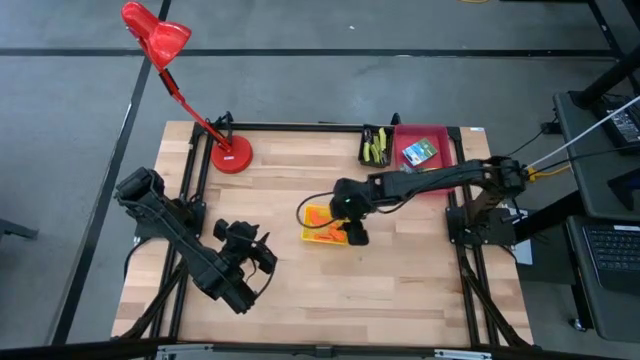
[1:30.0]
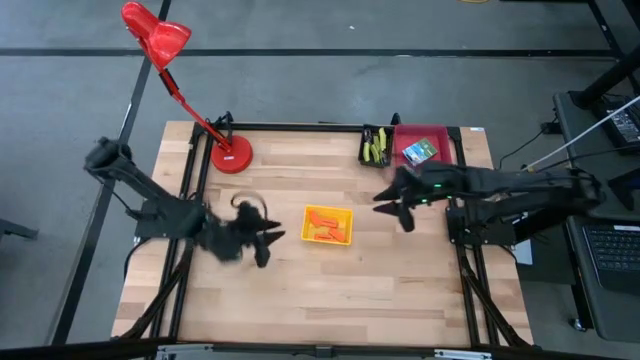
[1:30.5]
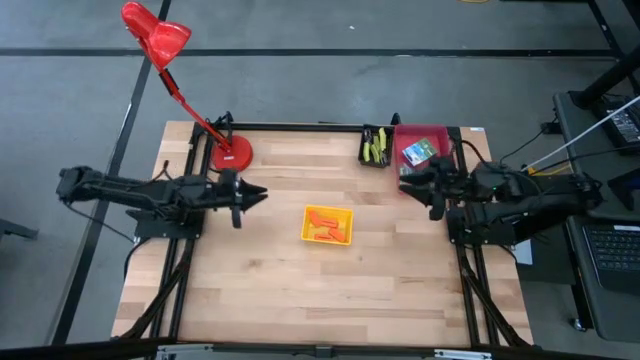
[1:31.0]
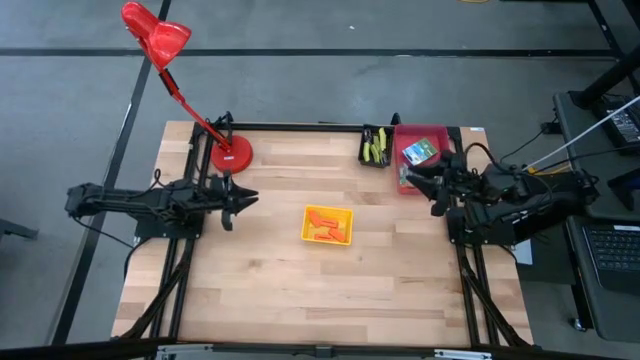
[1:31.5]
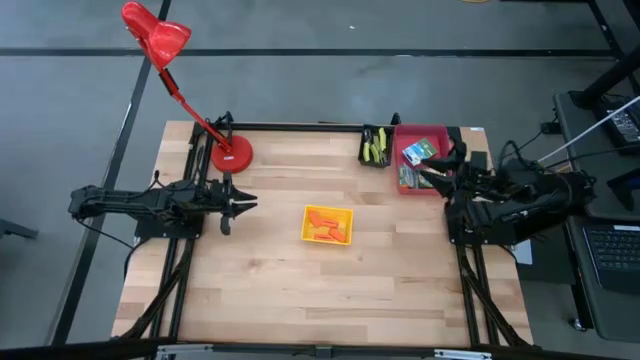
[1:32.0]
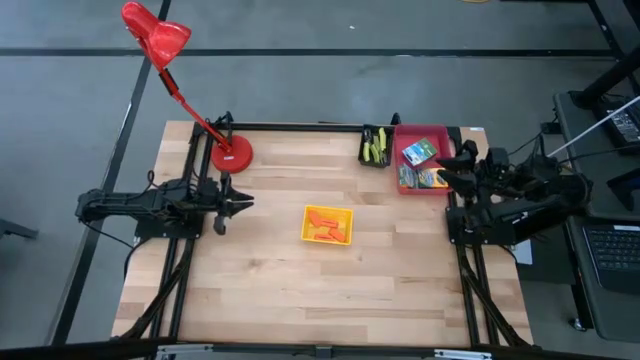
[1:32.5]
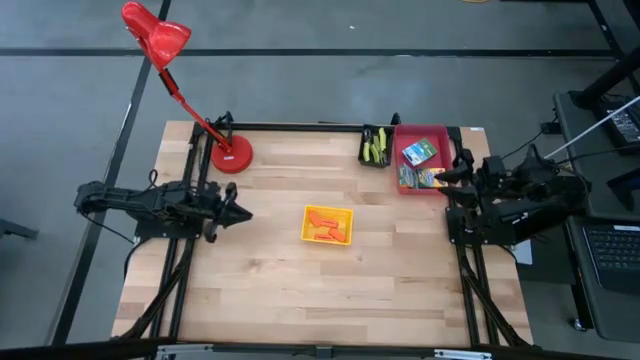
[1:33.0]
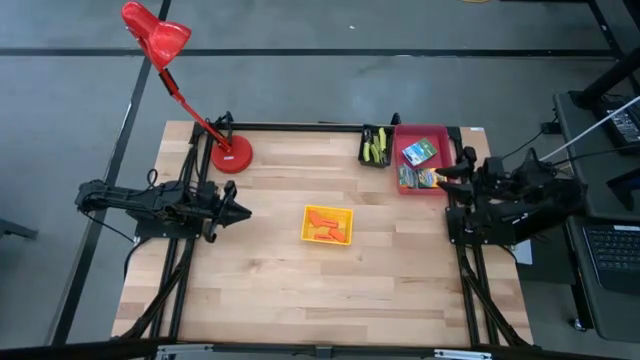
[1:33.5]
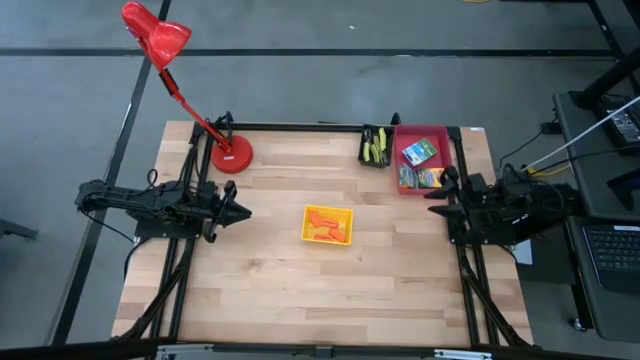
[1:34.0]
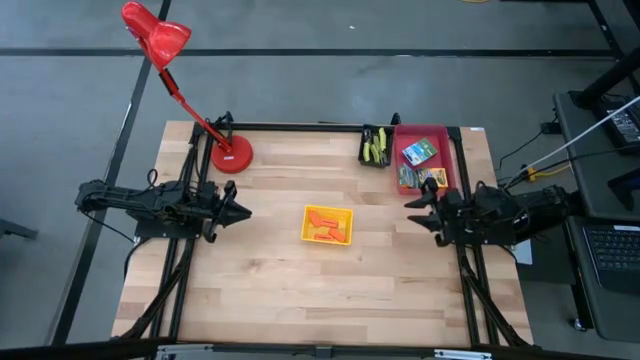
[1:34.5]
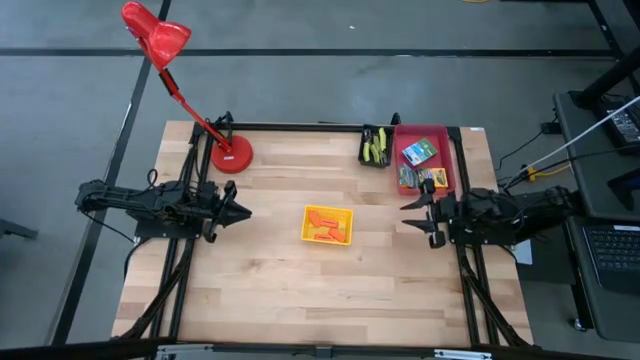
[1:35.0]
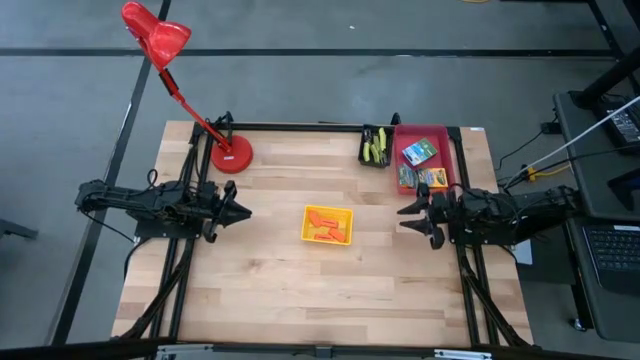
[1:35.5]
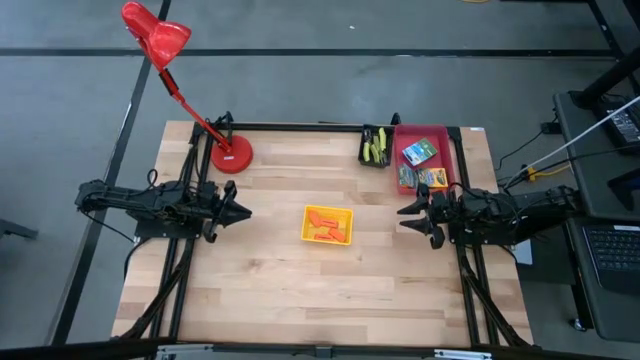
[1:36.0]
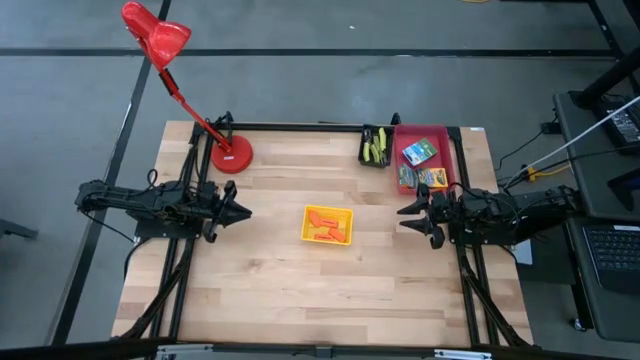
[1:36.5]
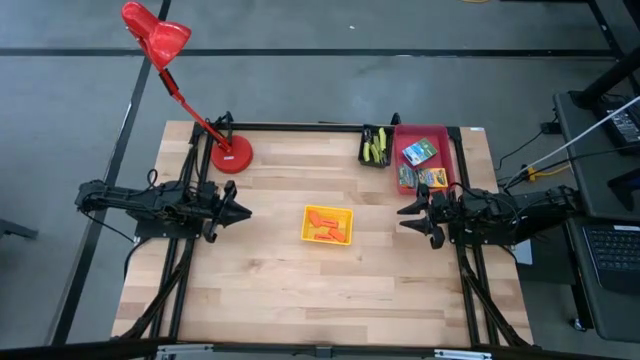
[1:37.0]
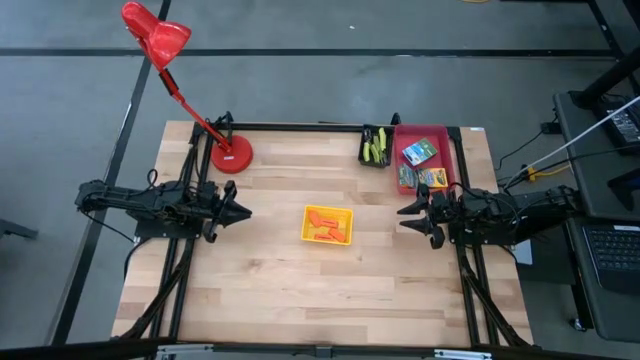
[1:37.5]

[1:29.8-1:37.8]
Task: Pick & Place School Supplies
Return to Home Position

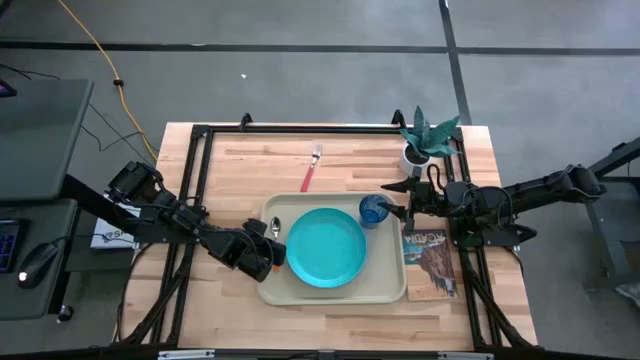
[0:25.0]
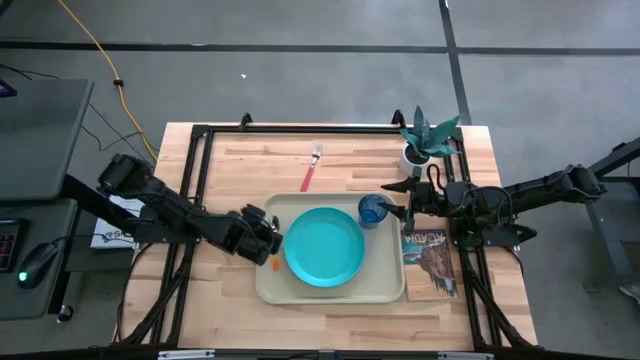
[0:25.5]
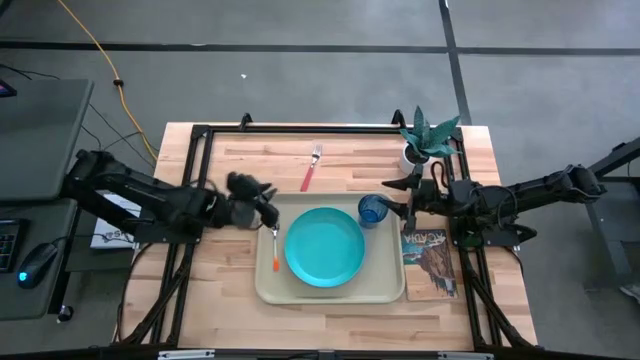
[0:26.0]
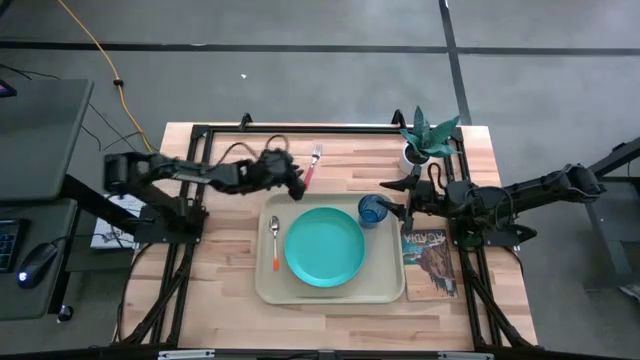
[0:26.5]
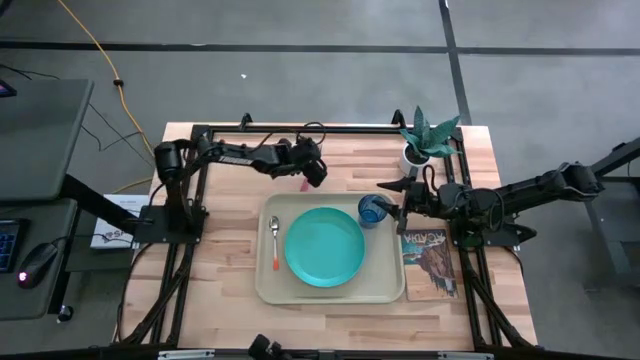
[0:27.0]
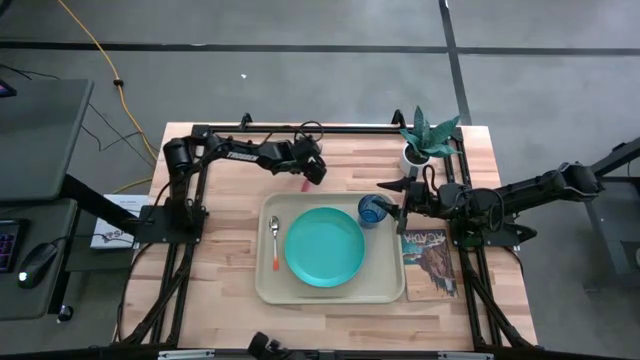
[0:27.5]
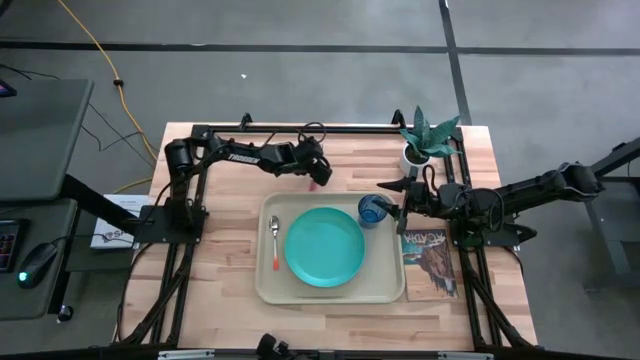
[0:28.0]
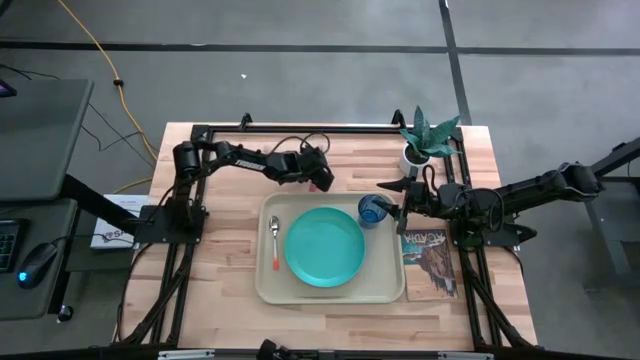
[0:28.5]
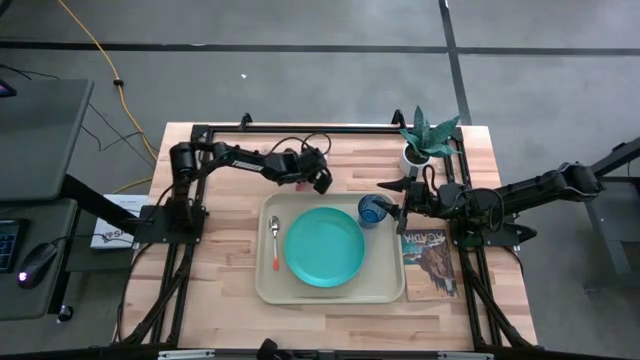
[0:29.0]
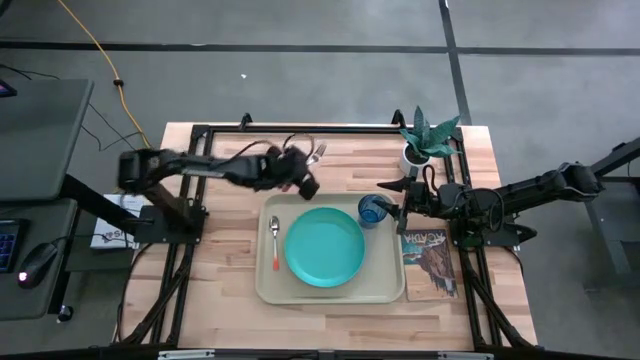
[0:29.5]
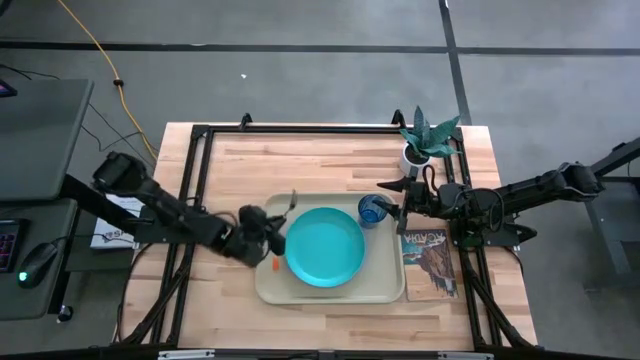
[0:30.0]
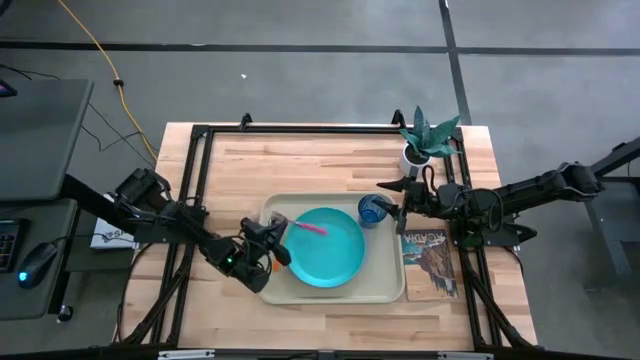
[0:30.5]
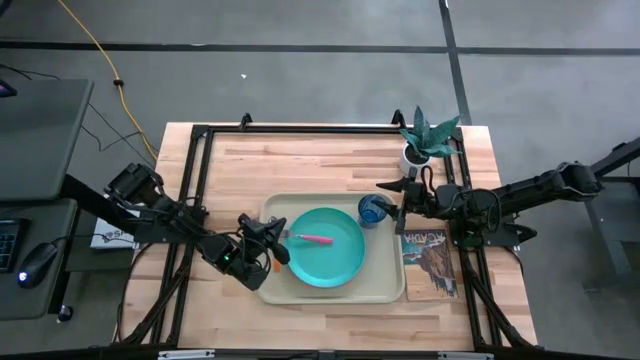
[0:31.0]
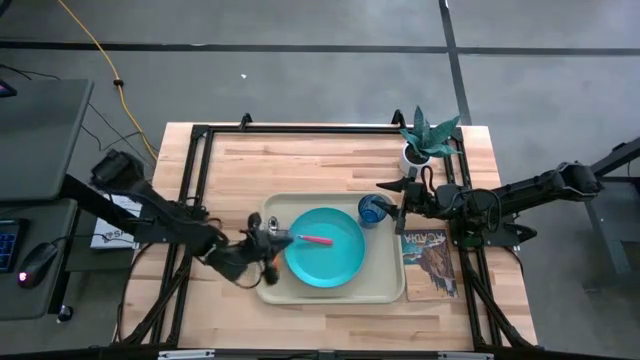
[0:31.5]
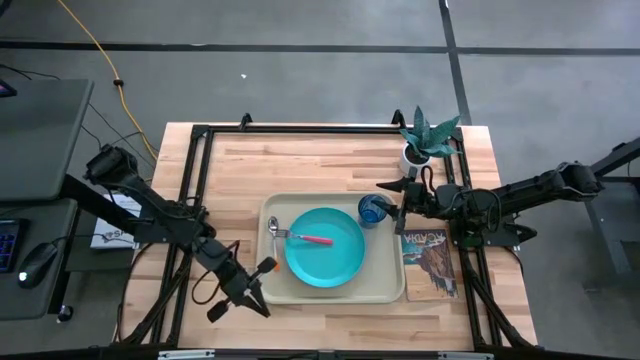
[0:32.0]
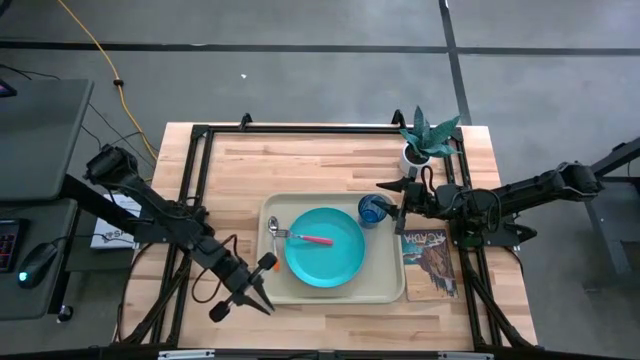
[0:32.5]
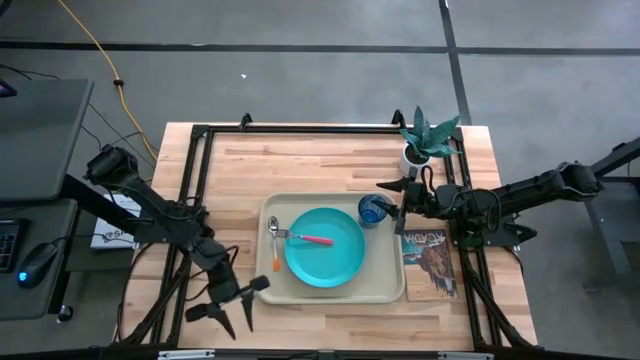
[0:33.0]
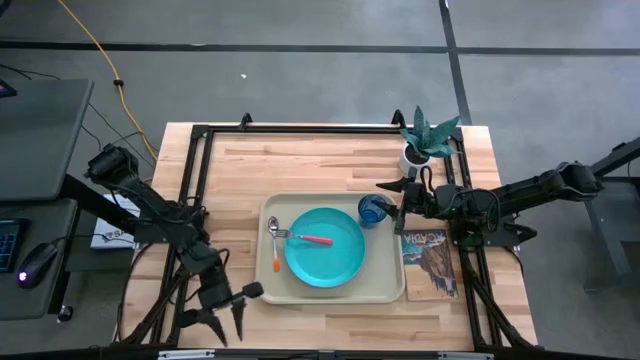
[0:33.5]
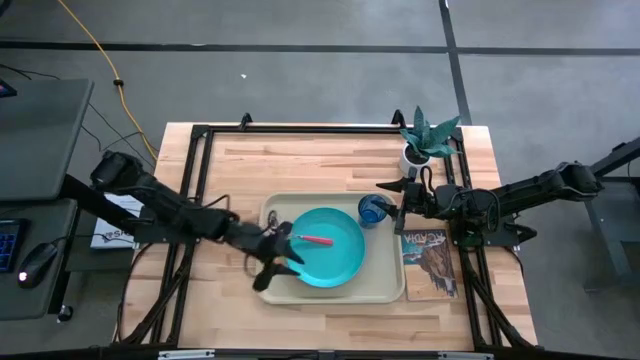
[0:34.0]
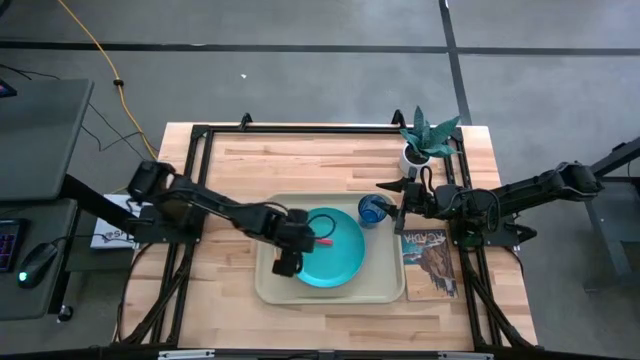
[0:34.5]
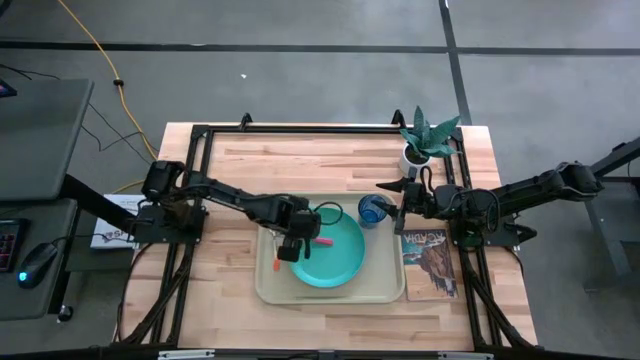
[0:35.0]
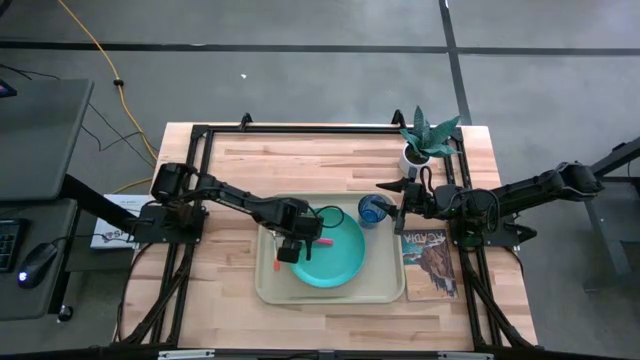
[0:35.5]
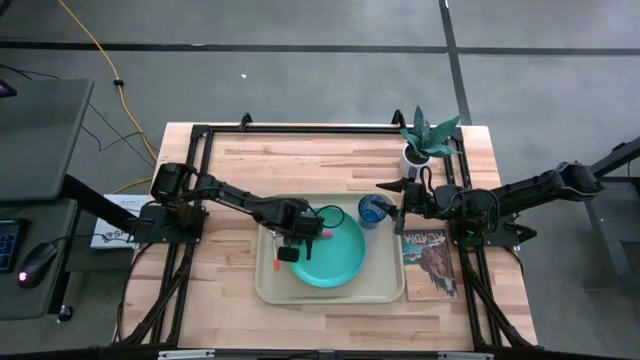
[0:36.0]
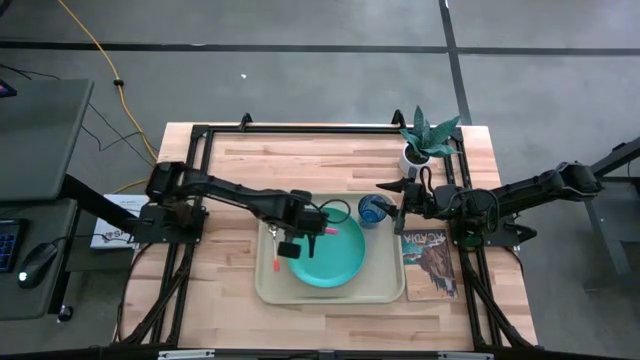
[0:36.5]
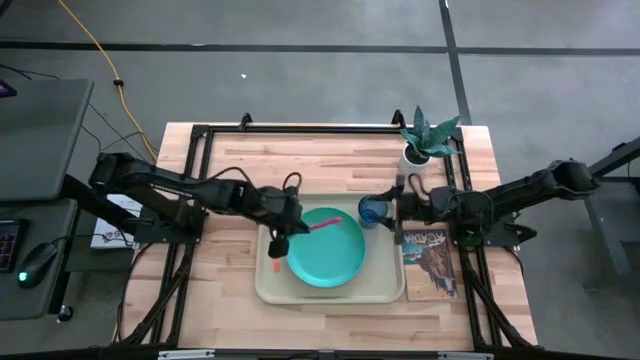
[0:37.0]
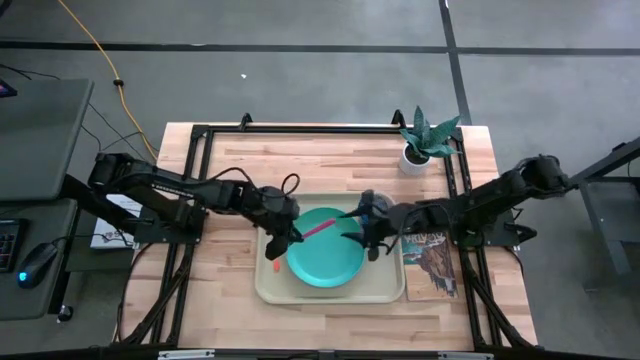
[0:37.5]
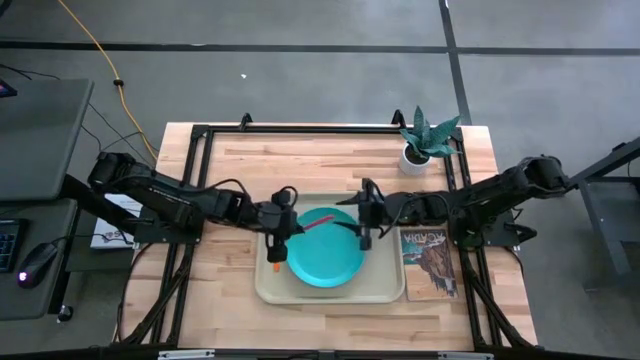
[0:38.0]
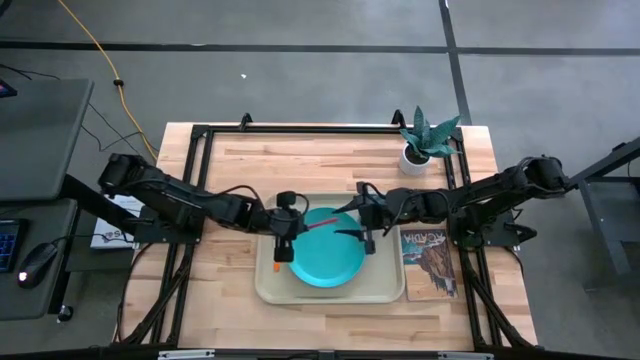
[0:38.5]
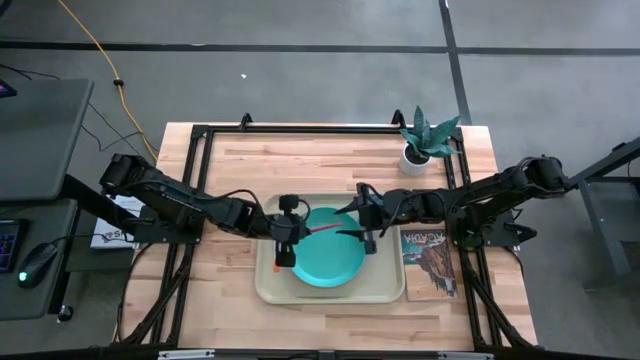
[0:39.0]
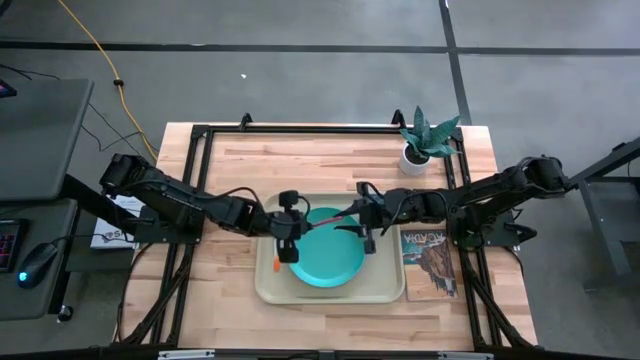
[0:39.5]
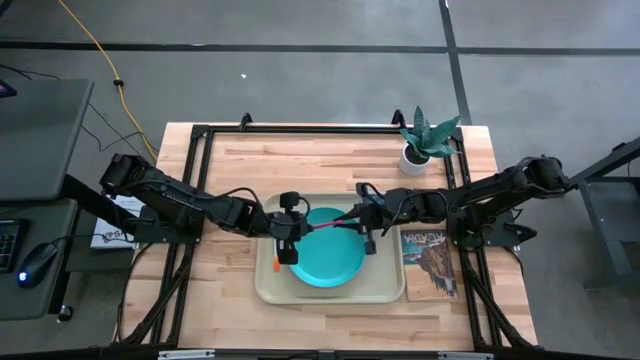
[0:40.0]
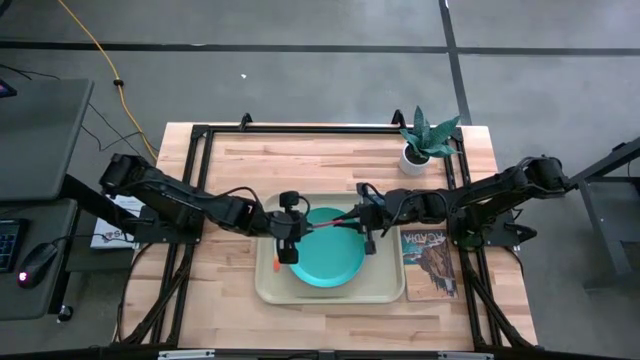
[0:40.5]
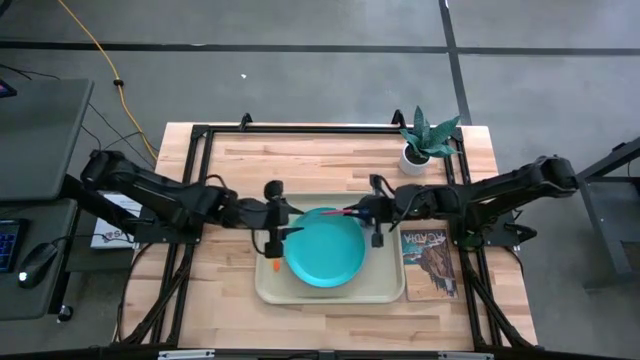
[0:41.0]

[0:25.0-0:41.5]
Task: Pick and place plate/cup/fork/spoon on tray
Put the pink fork to the left of the blue plate on the gray serving tray
